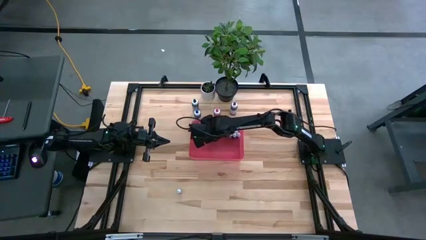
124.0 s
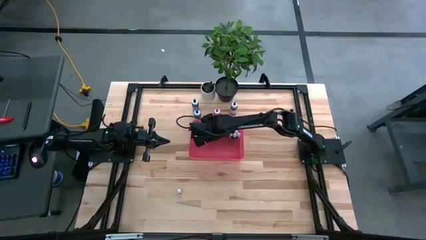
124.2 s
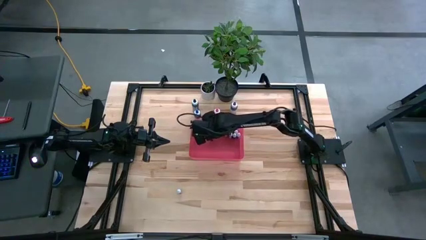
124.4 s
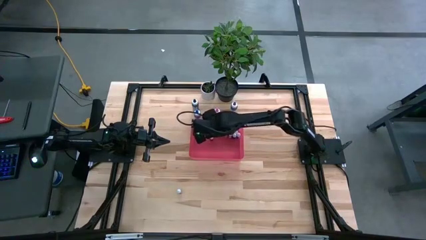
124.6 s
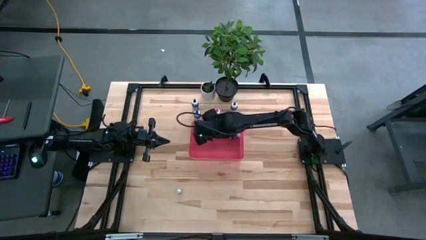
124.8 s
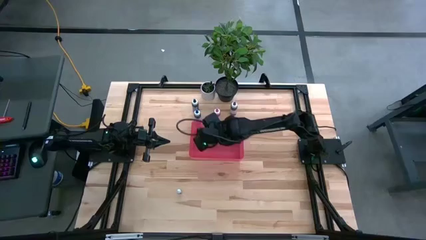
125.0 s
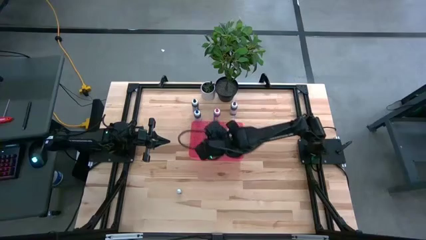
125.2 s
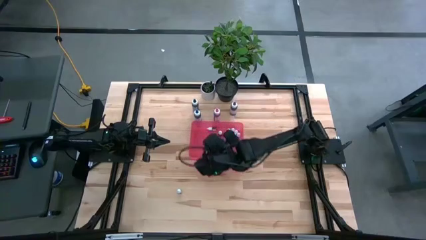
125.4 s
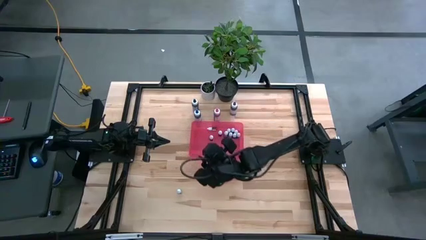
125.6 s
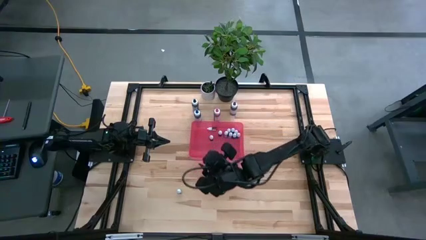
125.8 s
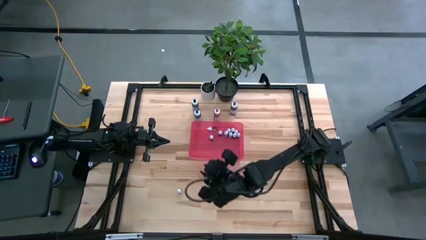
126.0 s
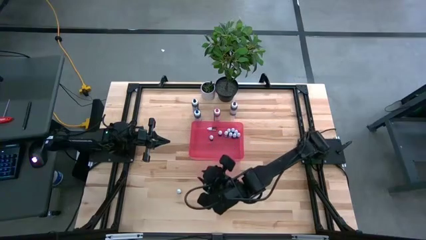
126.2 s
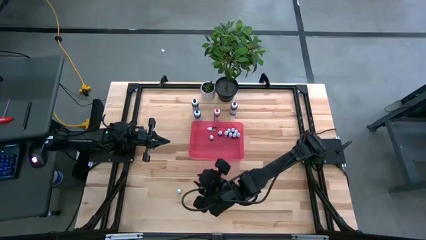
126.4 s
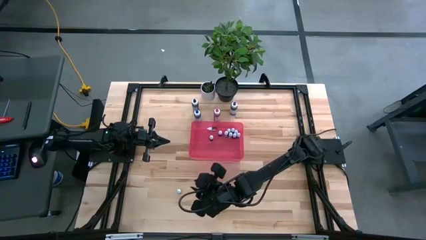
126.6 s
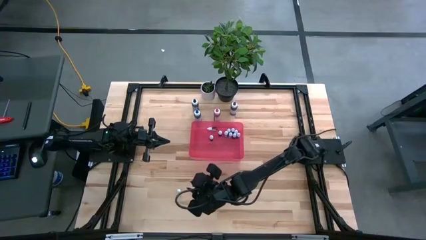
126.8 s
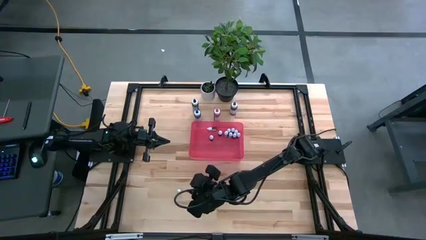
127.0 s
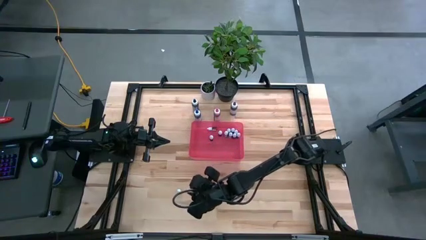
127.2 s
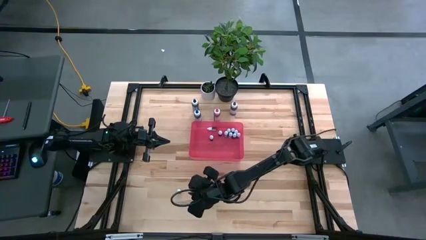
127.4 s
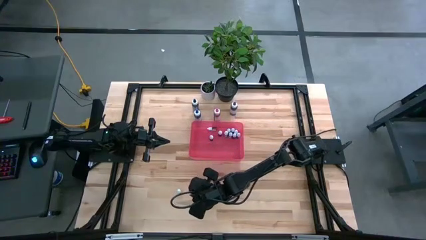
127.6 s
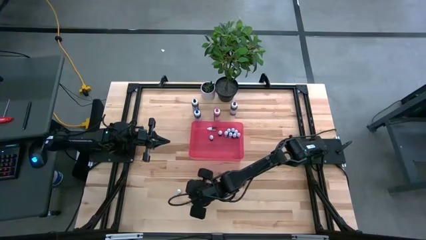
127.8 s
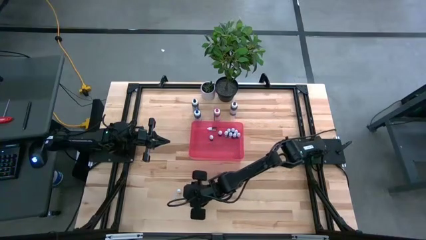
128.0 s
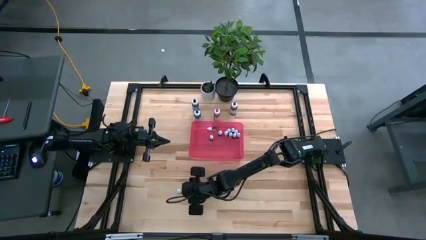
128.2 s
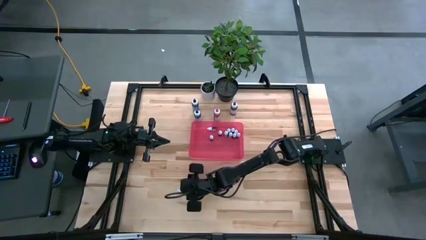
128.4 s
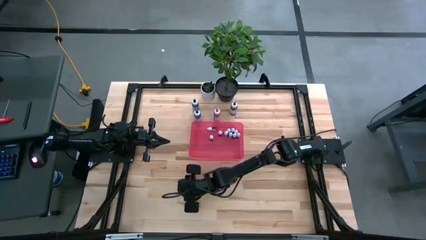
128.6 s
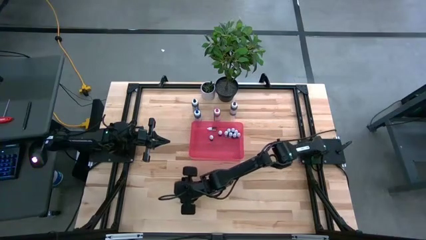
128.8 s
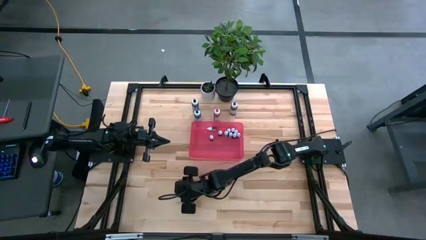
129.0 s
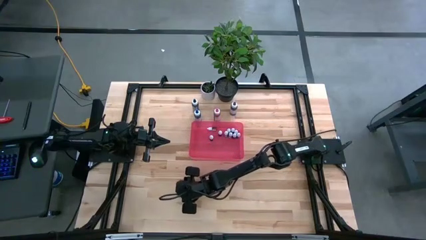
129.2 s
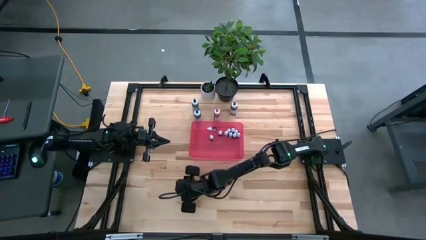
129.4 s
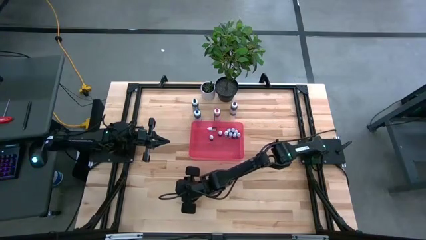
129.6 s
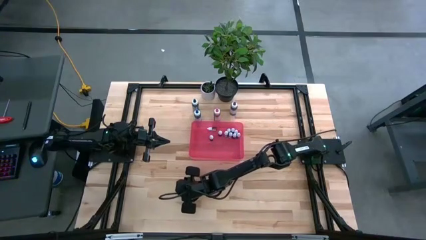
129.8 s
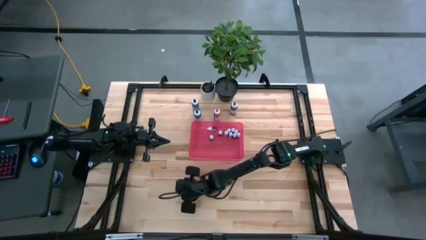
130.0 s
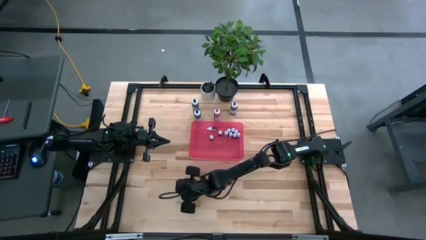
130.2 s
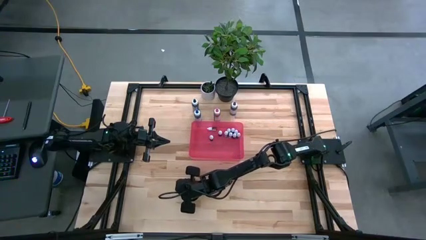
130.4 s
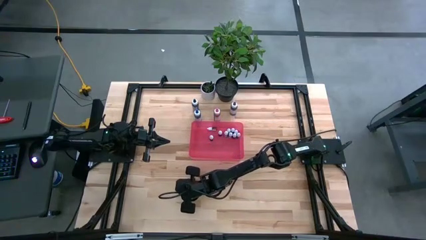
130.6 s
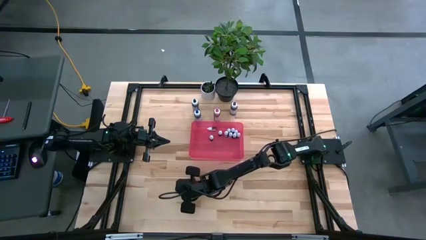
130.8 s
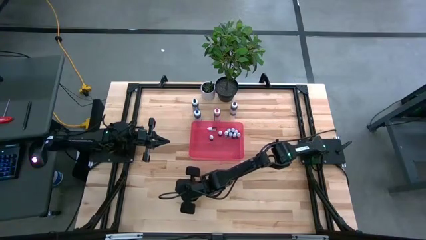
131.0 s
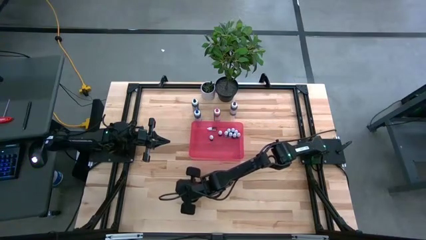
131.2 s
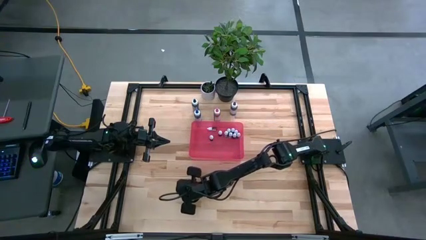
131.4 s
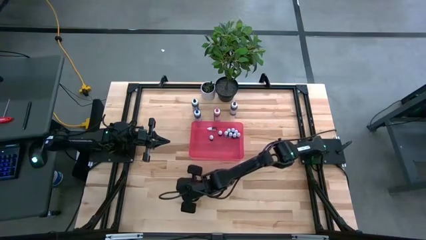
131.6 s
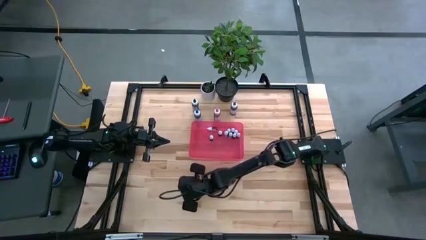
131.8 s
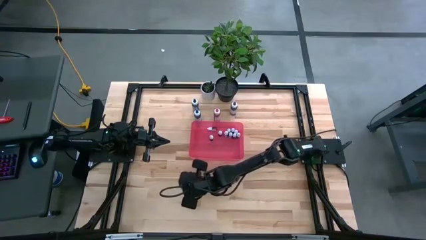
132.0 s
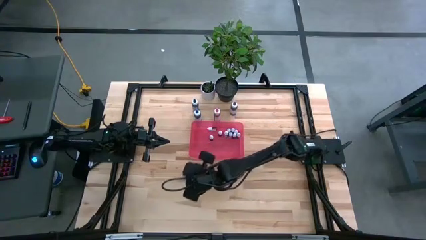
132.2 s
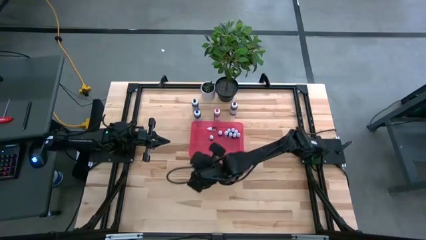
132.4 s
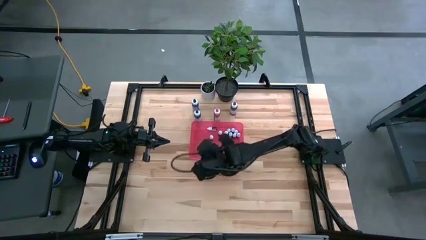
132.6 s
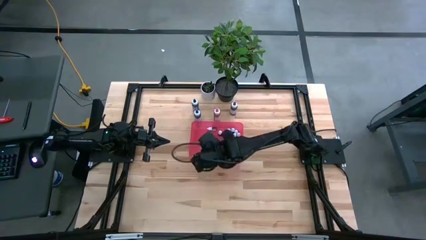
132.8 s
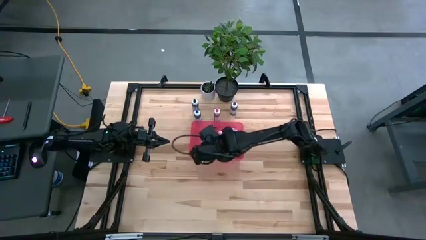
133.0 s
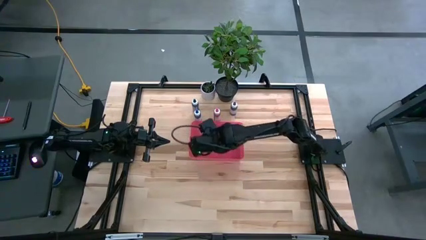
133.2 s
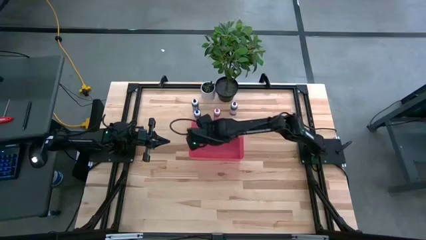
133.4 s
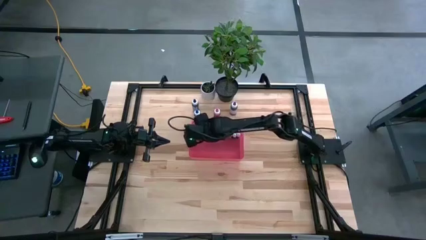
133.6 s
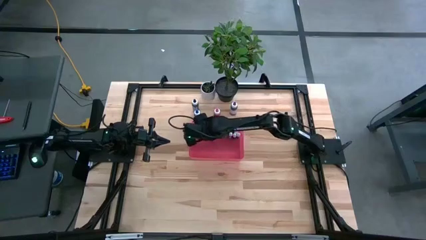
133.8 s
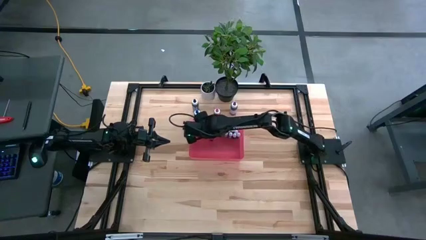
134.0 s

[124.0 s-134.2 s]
Task: Pick & Place food coloring
Put the small brown food coloring bottle into the pink container

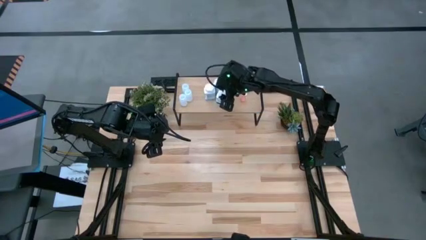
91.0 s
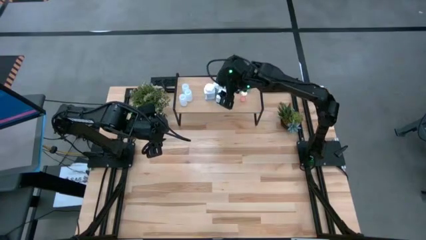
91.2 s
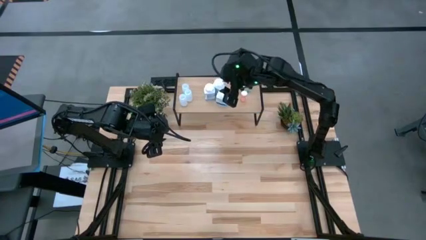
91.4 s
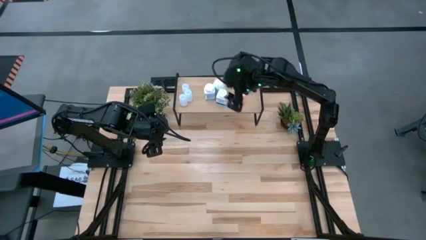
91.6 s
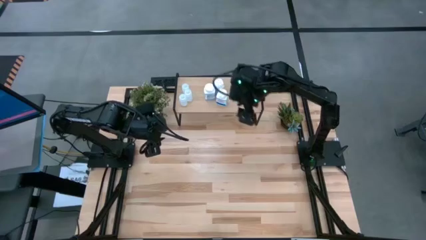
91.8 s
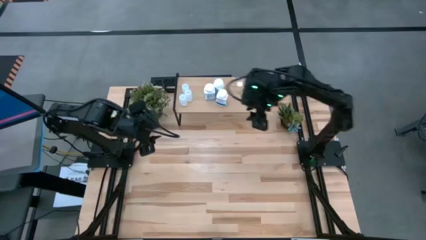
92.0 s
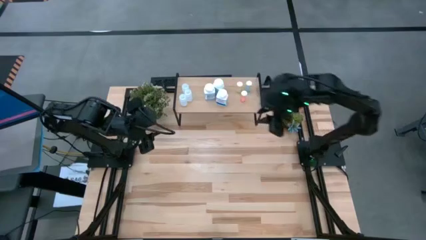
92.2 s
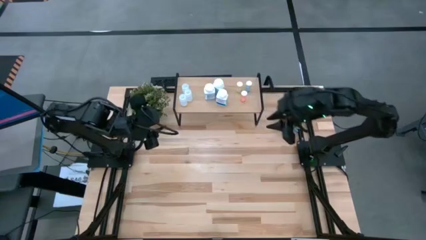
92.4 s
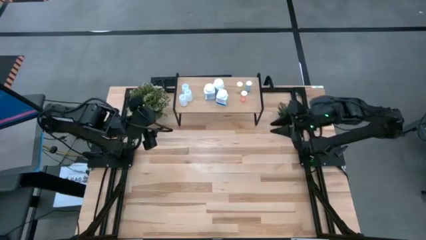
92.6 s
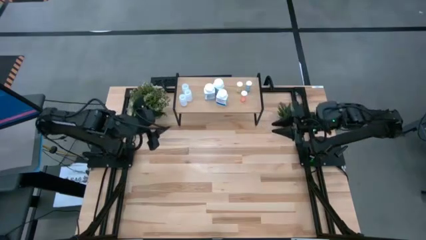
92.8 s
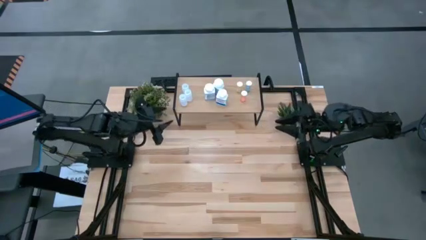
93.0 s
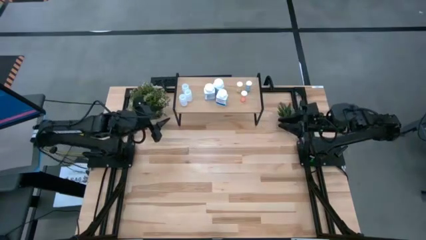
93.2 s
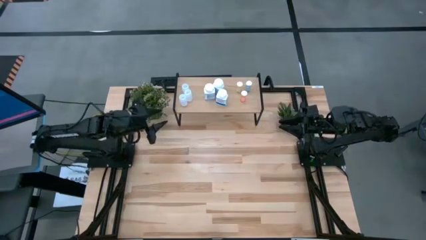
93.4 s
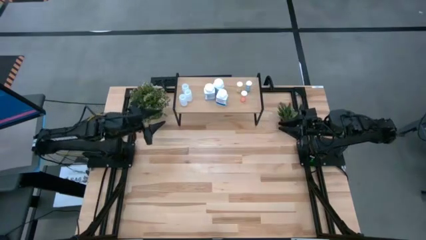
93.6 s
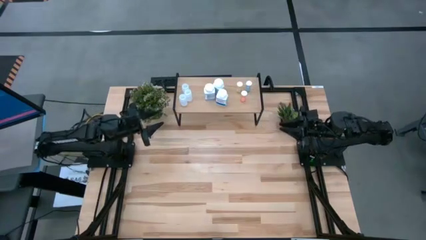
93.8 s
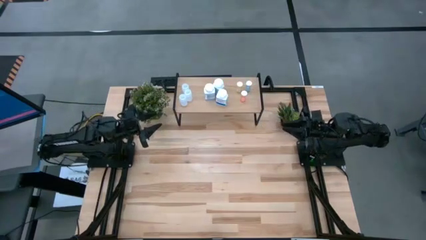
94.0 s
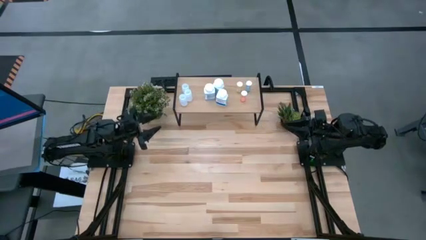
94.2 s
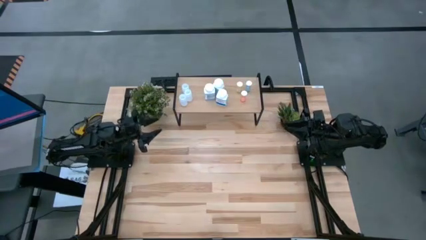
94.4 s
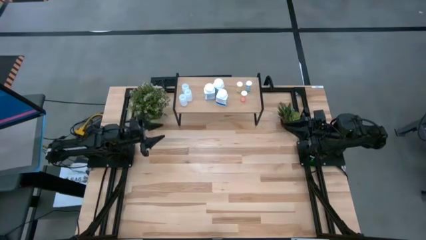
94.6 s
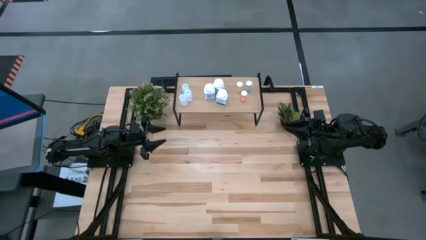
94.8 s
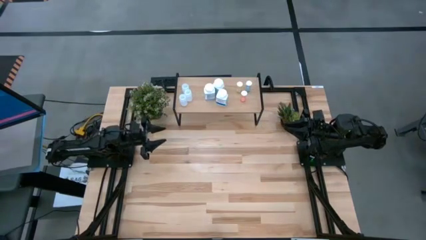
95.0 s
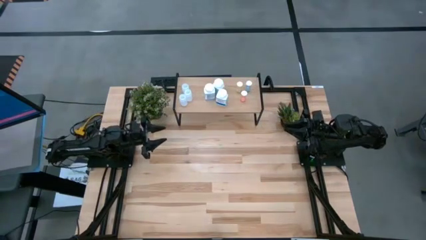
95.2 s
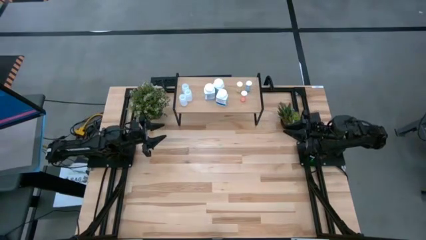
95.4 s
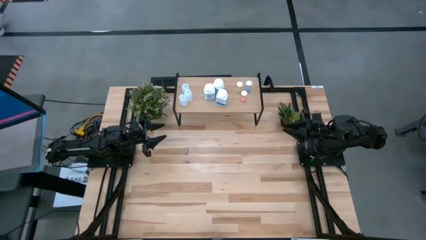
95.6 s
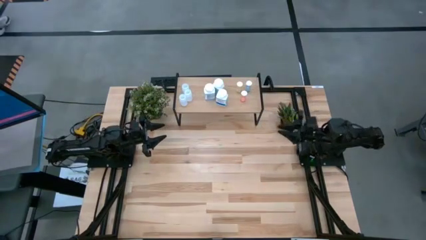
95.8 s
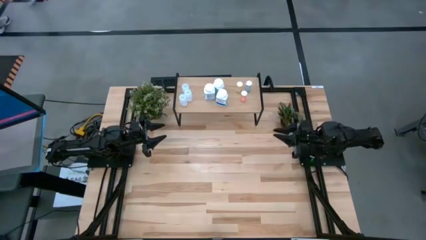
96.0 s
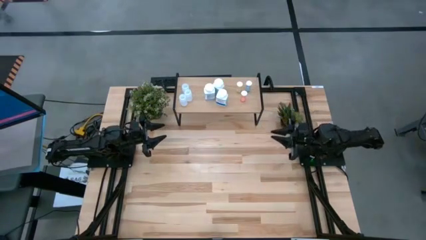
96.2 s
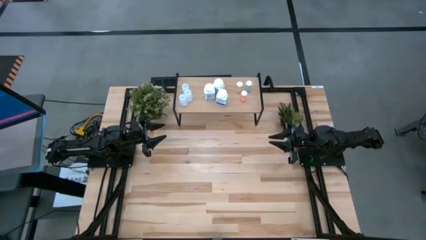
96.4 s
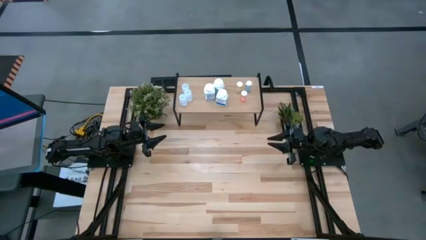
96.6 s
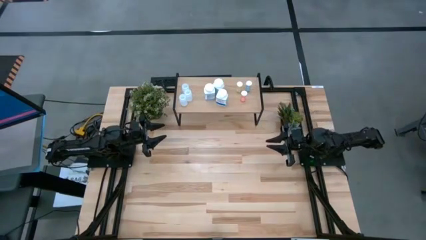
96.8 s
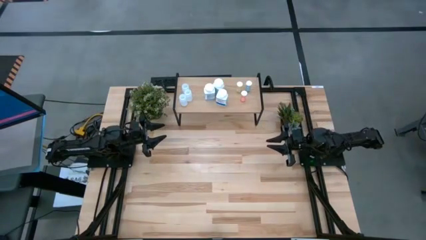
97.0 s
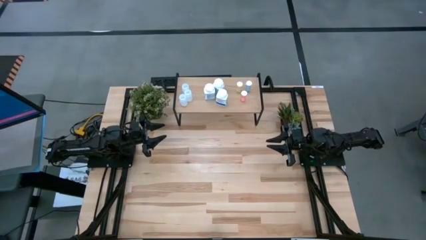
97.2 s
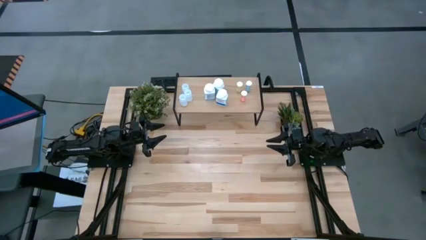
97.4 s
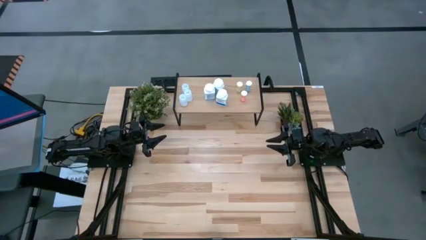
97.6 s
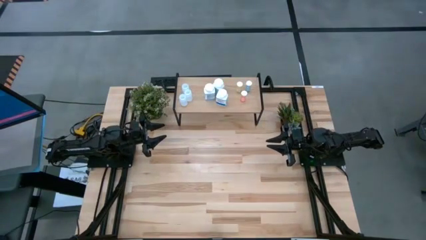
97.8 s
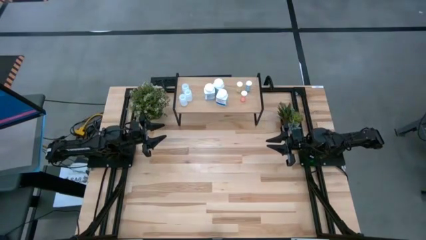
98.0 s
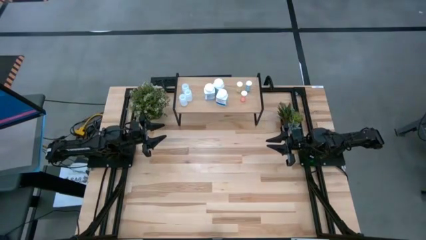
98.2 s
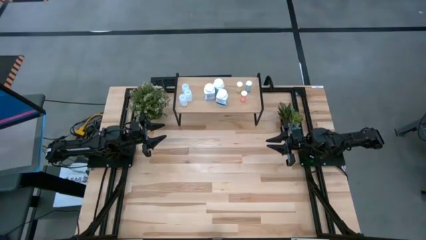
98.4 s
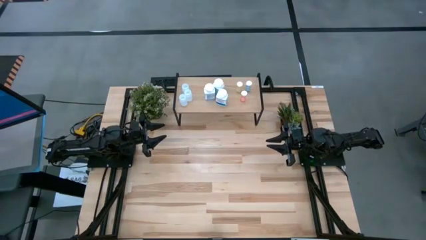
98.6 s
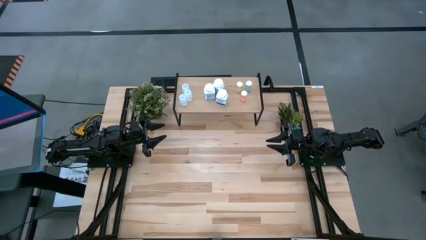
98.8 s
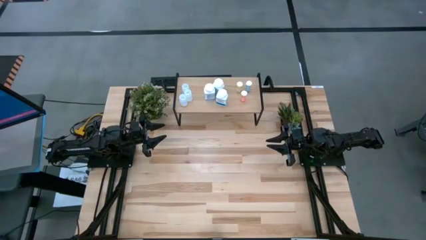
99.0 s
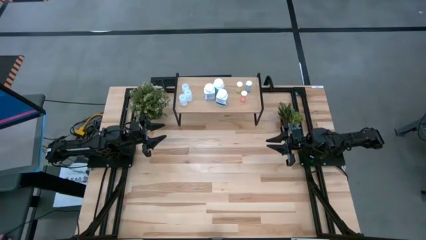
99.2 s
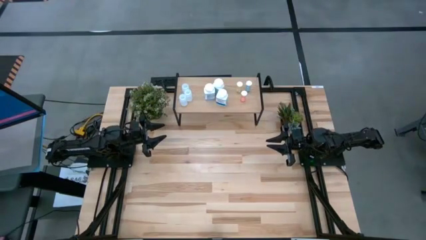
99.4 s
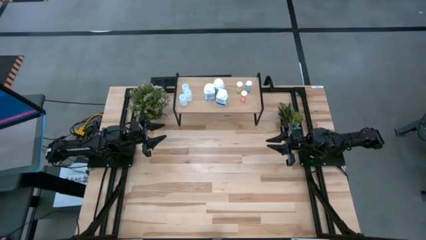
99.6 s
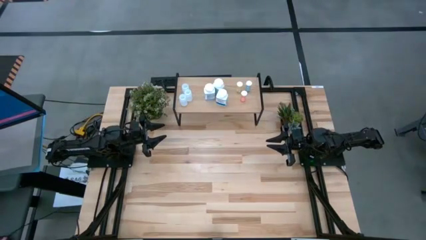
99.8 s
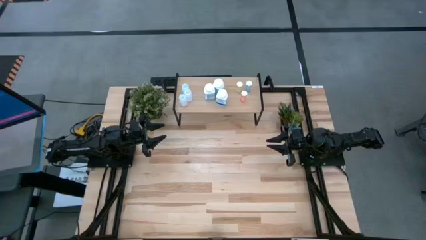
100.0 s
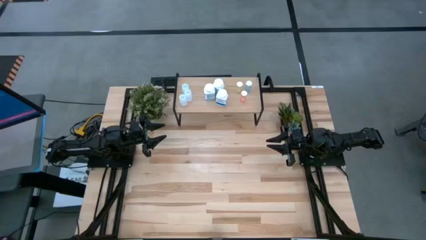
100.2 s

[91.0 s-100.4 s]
Task: Pick and place medicine bottles onto shelf by color
Return to Home Position
